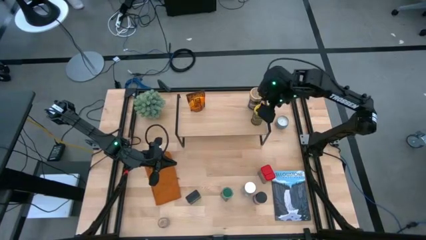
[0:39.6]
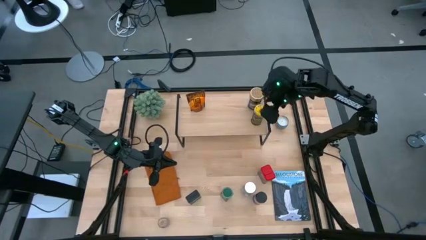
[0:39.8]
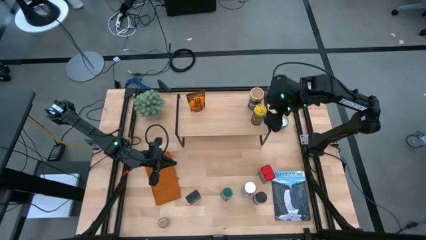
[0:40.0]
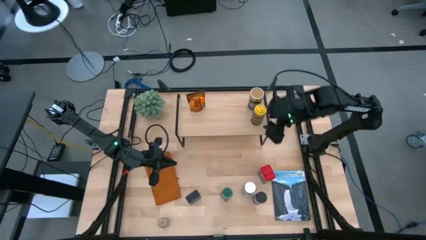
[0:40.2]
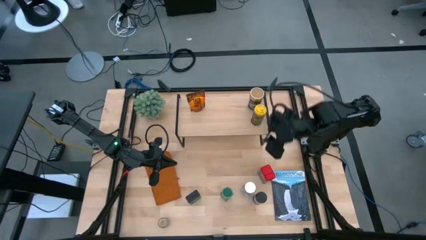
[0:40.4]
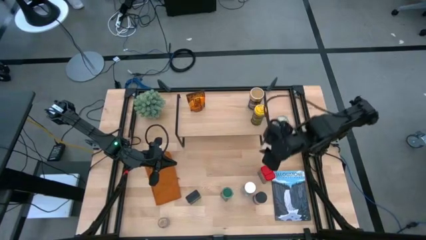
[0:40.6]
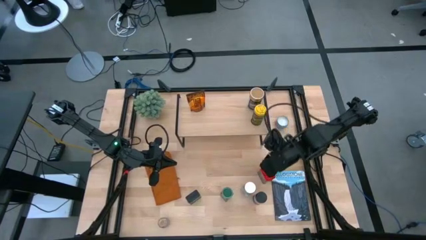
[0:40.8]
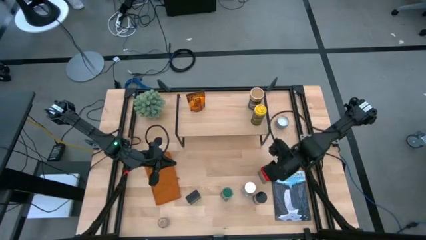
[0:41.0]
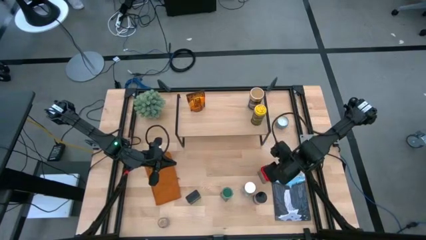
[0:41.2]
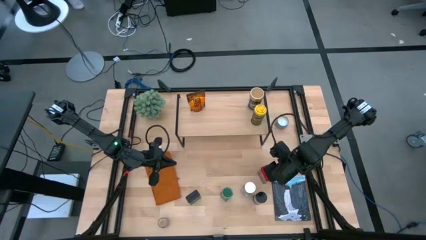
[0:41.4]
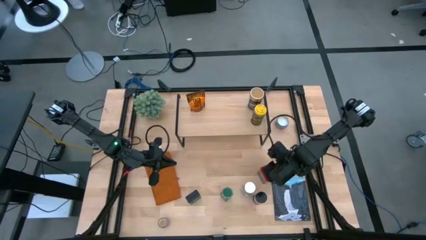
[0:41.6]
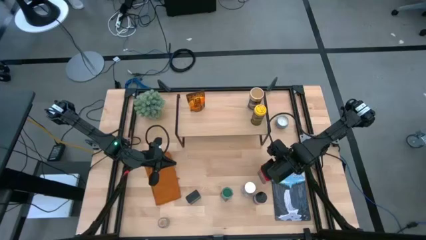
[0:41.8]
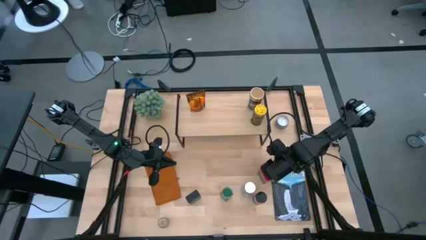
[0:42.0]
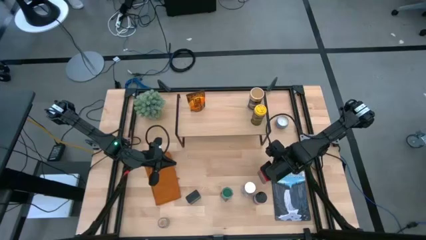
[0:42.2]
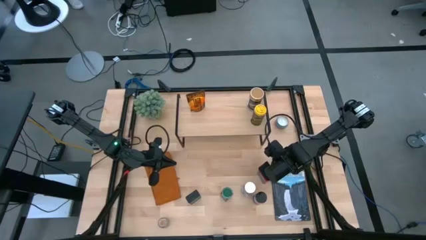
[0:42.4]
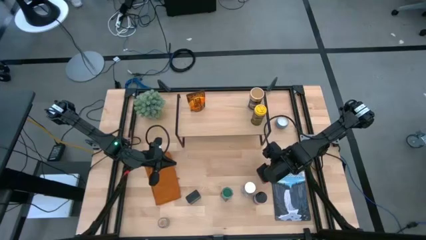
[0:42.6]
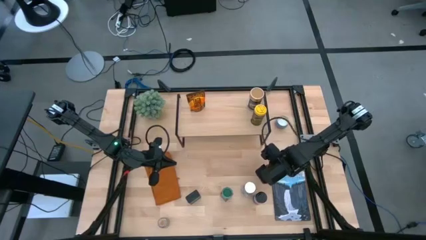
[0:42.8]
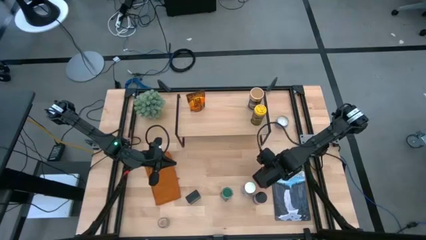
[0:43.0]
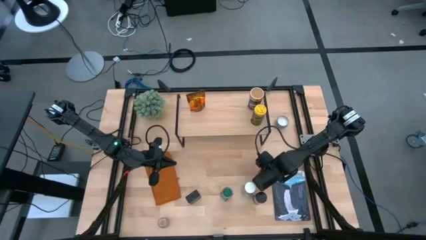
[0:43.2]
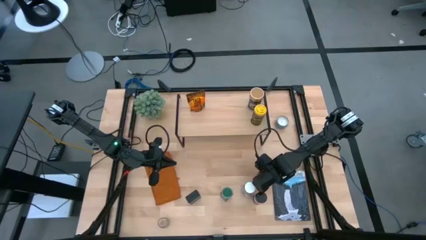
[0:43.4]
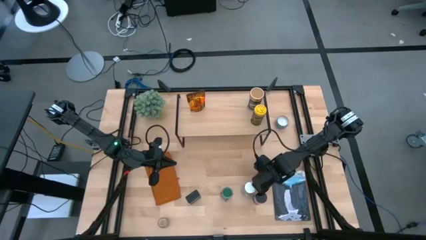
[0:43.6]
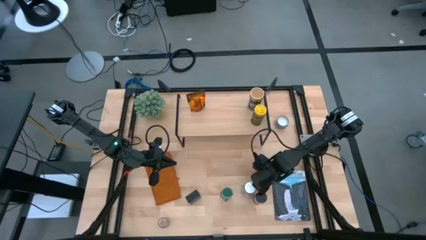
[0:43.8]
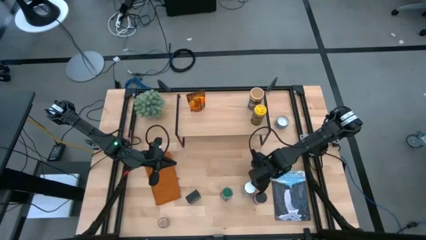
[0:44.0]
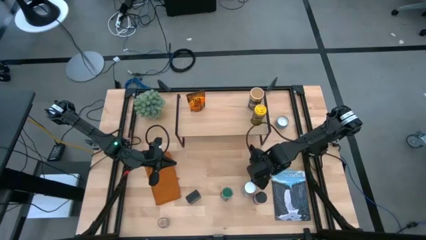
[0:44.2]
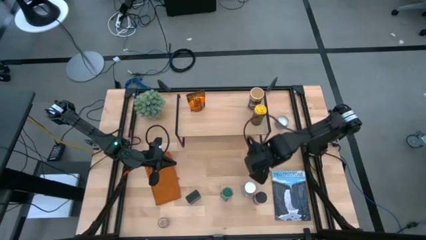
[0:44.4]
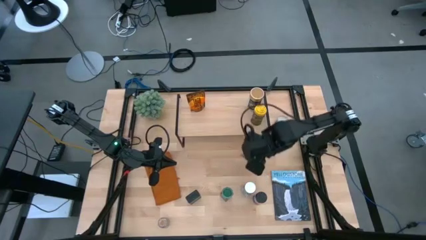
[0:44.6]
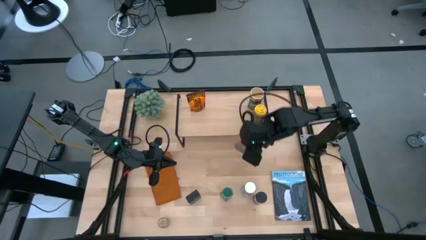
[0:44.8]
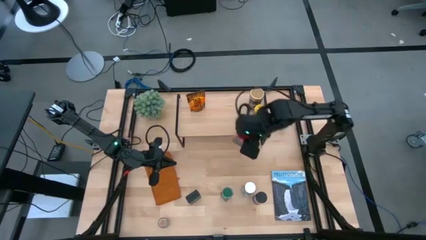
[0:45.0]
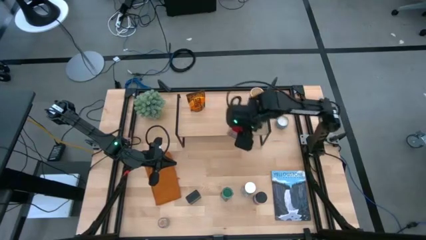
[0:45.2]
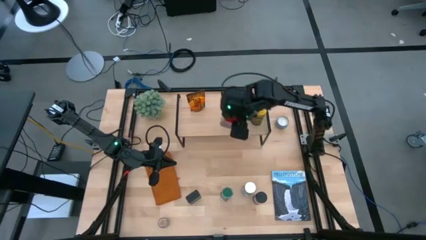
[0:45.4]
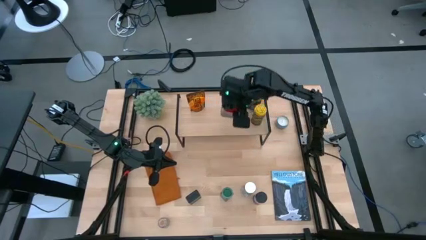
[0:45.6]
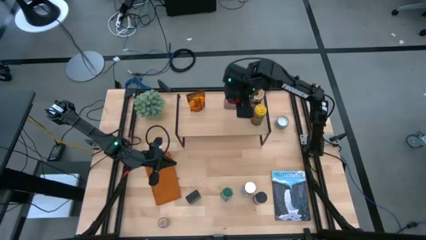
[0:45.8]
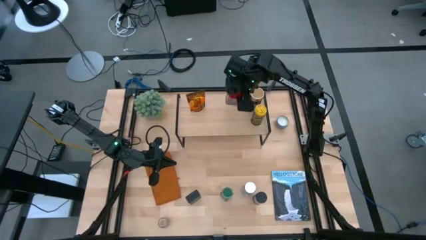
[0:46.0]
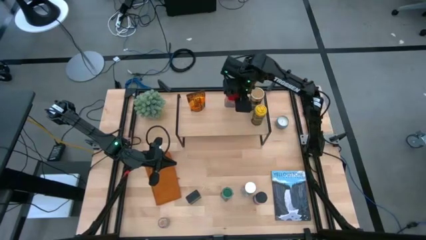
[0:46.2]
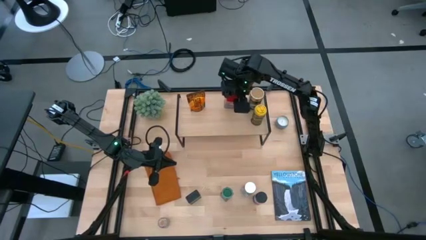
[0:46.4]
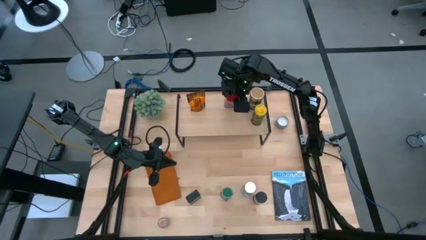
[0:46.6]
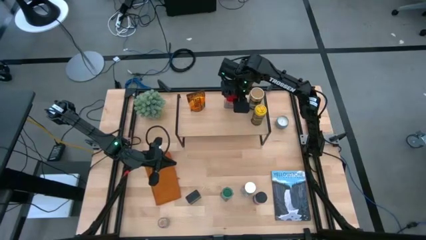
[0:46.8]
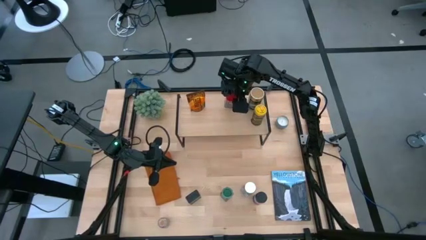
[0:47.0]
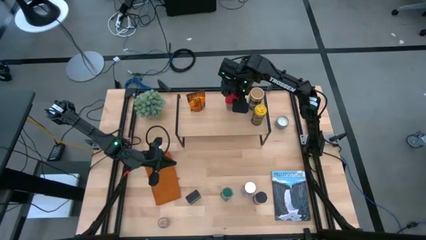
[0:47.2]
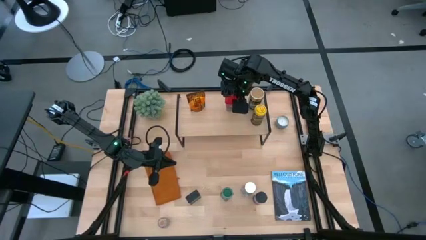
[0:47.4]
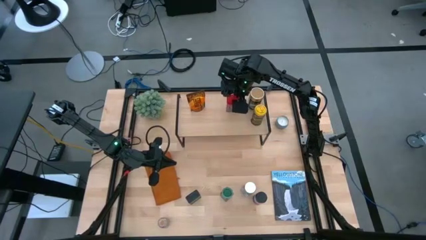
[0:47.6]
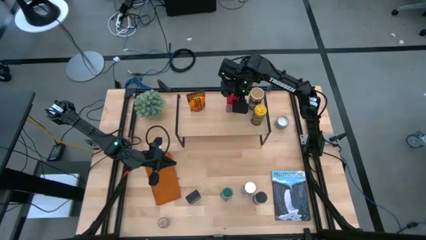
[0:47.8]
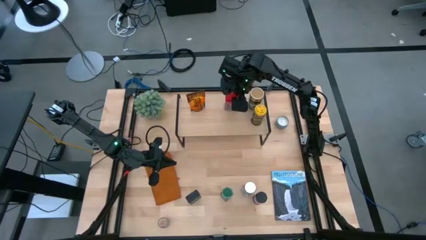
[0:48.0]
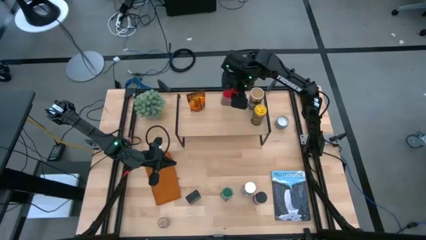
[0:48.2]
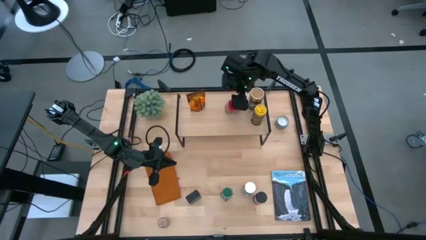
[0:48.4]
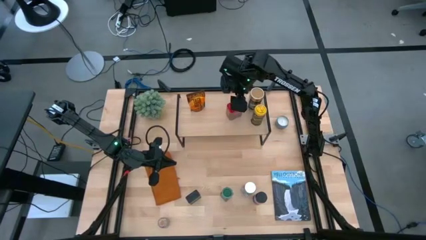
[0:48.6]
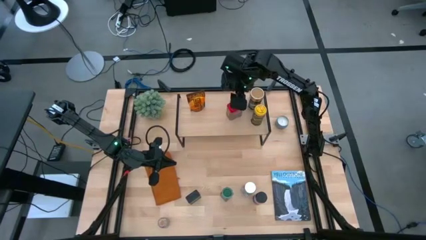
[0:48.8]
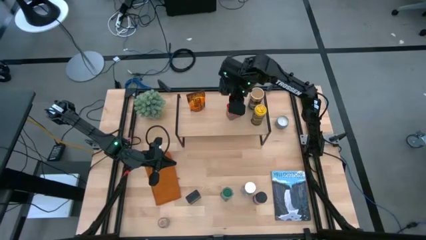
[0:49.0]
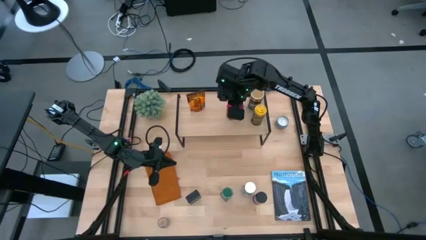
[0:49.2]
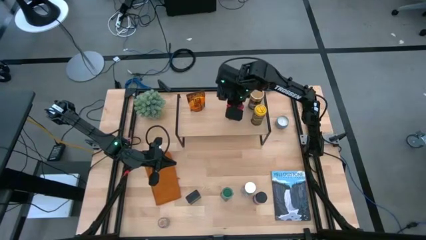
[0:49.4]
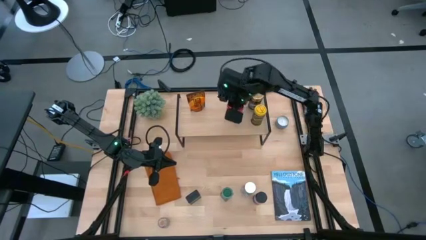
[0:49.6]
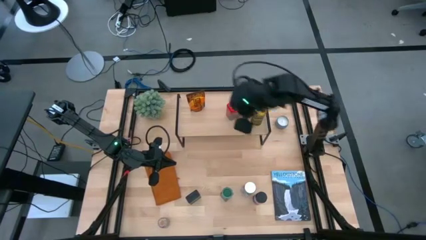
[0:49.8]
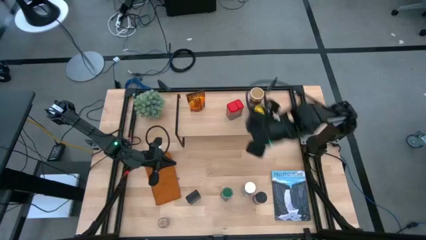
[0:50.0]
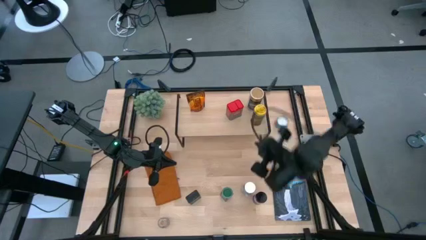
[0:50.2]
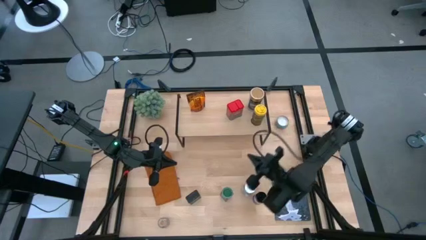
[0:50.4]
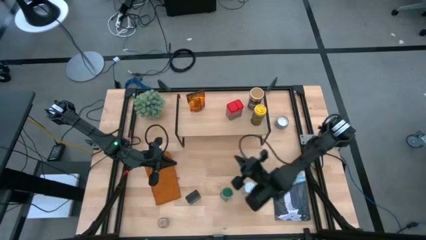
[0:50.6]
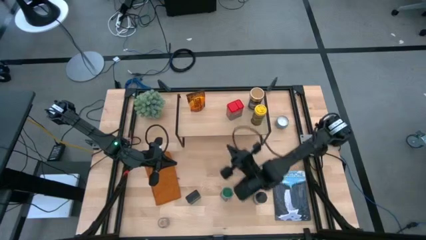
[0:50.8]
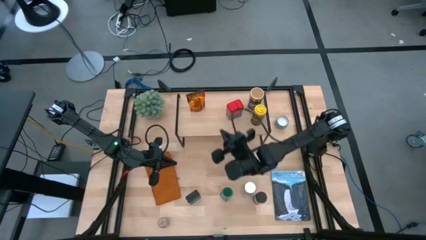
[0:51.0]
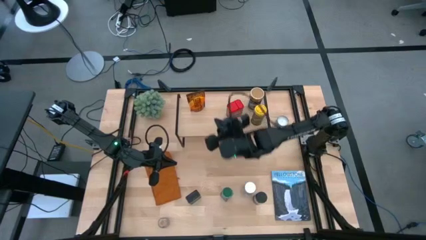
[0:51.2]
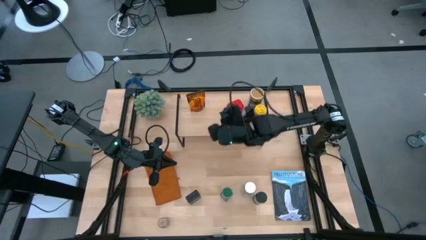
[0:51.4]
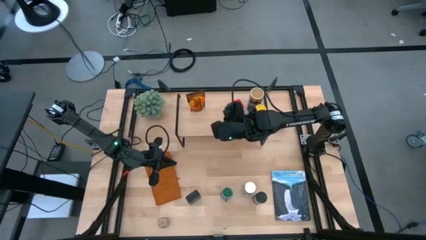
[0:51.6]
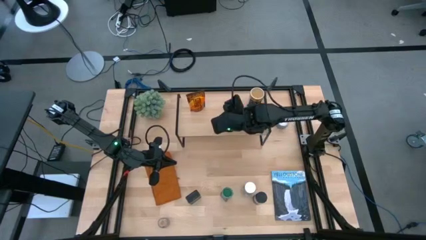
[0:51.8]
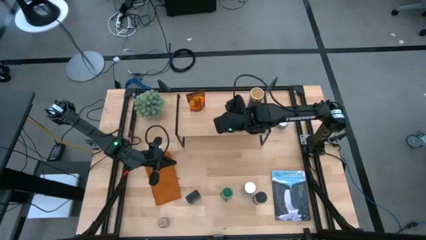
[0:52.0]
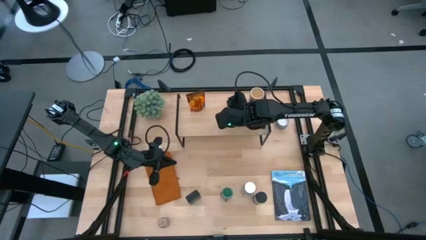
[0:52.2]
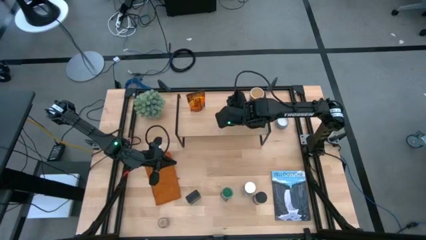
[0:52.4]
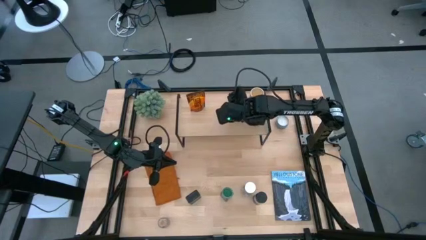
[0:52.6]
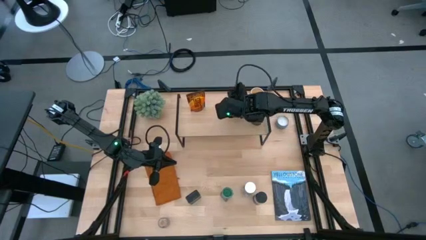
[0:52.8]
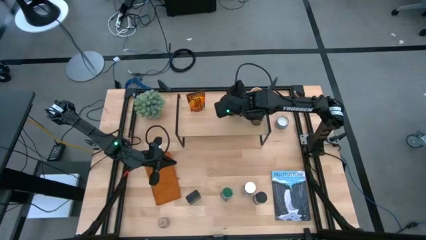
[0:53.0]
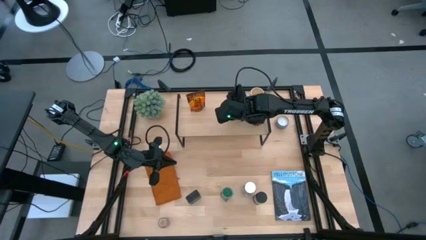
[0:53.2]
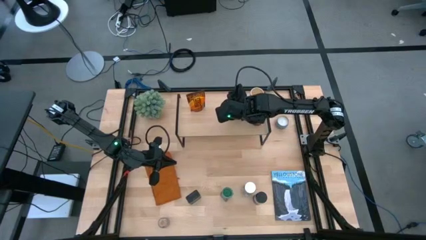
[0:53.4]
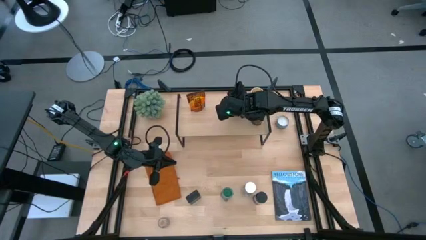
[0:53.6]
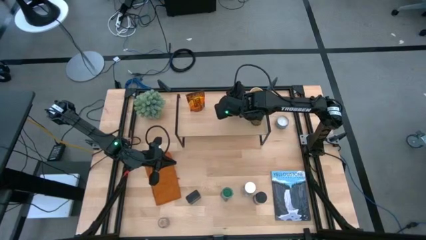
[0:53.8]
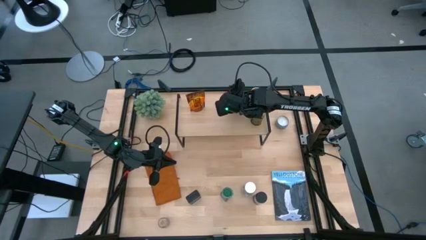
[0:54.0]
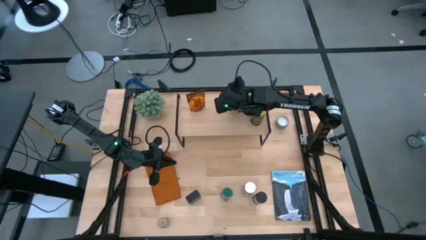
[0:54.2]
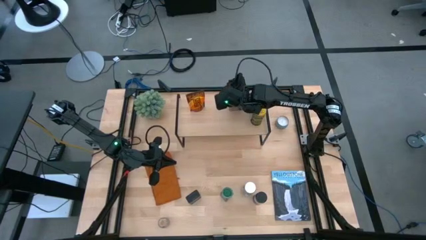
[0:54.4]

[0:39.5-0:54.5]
Task: Shelf spices
Put the red seasoning can on the shelf

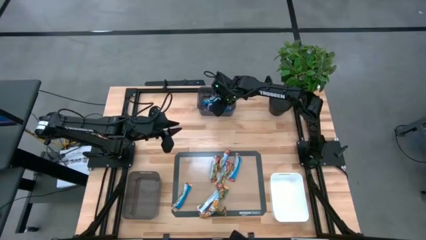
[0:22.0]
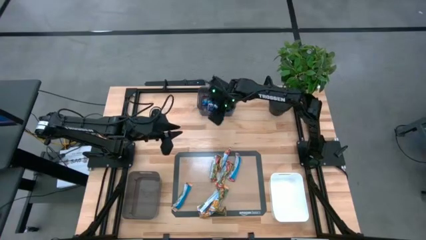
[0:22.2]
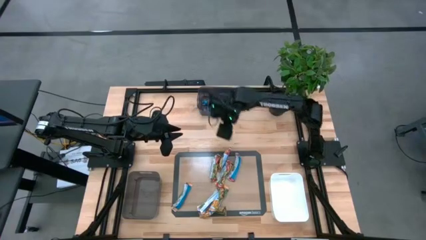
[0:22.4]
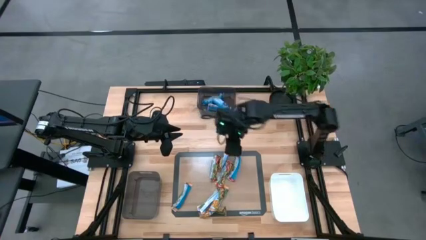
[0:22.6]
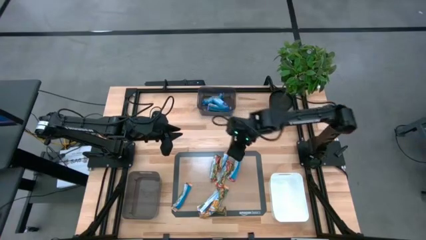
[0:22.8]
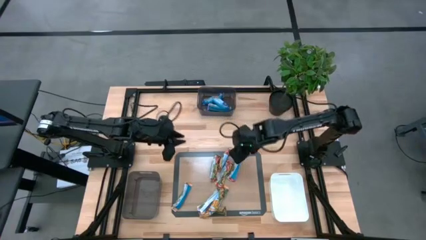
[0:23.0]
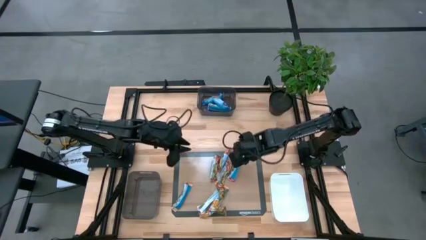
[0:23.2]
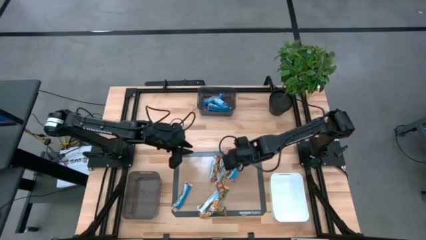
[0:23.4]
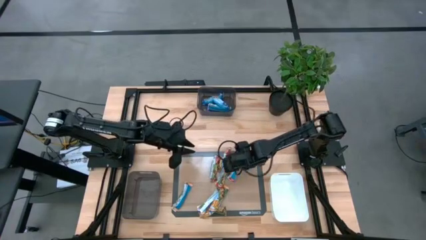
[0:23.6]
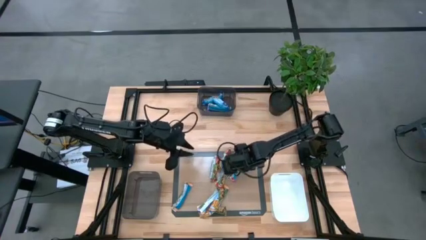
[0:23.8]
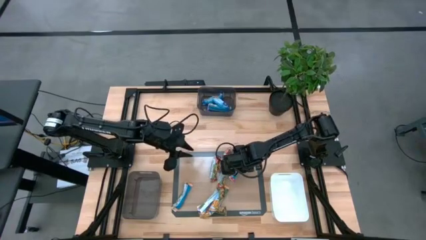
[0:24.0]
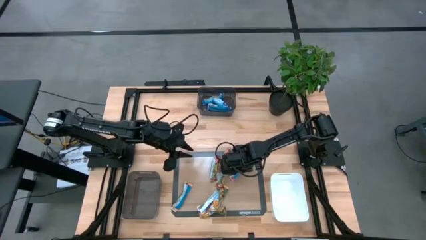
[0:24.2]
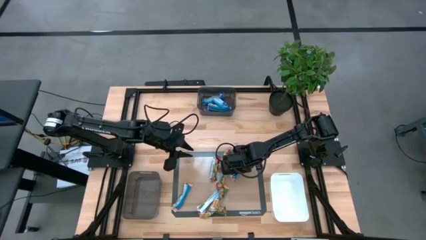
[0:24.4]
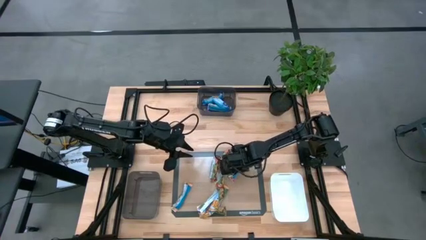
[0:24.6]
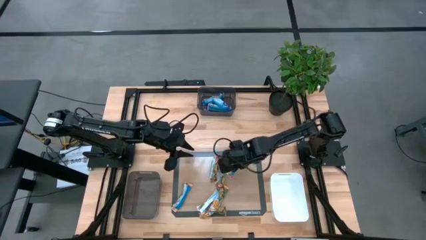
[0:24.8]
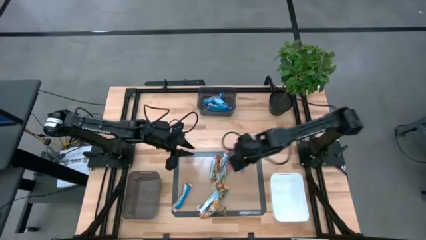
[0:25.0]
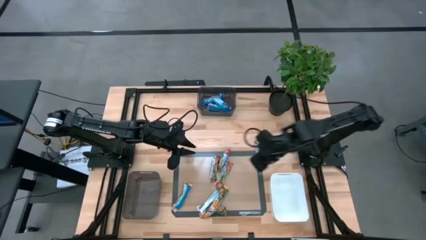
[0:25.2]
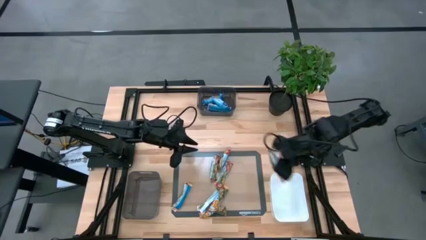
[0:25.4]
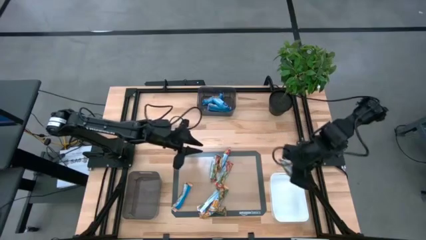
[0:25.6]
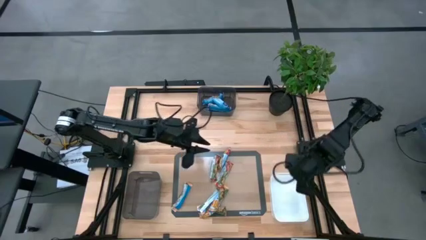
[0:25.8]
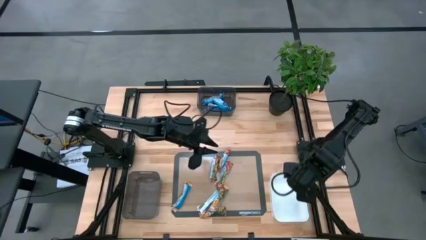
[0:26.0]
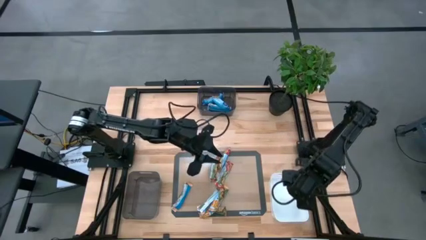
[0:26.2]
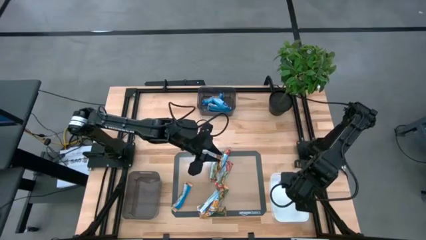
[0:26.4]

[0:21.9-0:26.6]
Task: Pick and place Granola Bars by type
Put the red granola bar into the white bin
